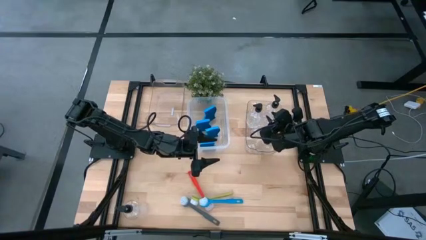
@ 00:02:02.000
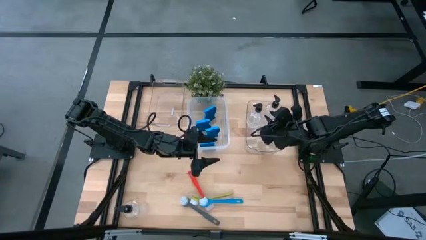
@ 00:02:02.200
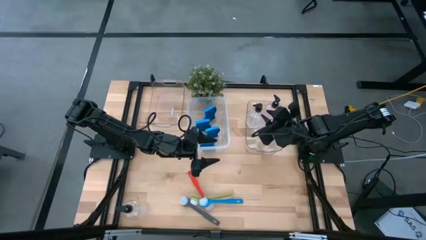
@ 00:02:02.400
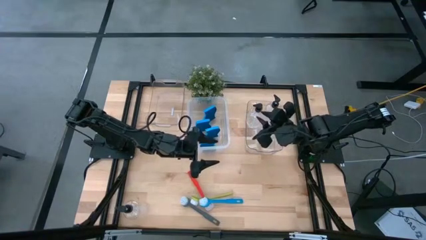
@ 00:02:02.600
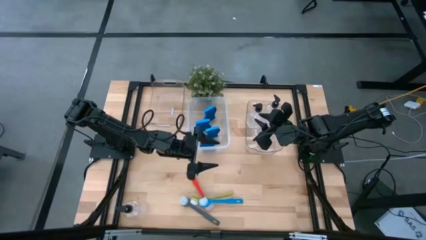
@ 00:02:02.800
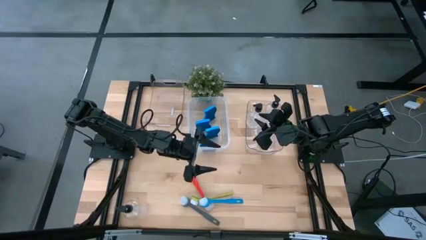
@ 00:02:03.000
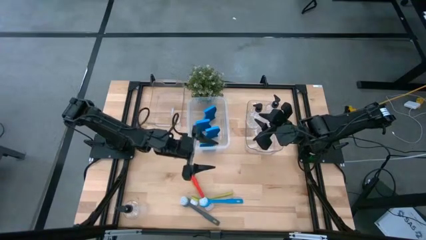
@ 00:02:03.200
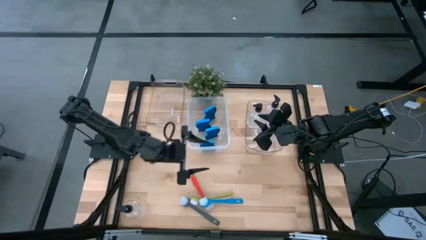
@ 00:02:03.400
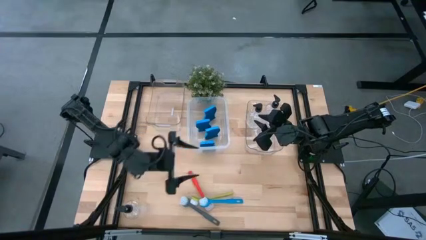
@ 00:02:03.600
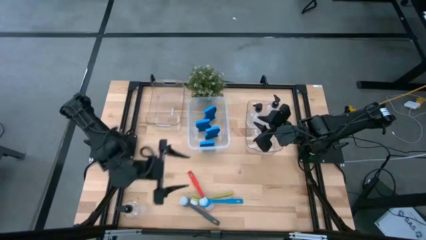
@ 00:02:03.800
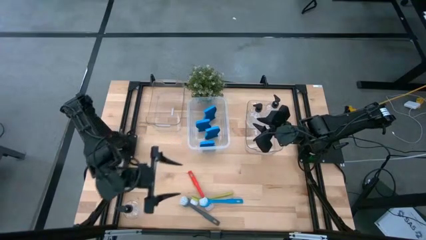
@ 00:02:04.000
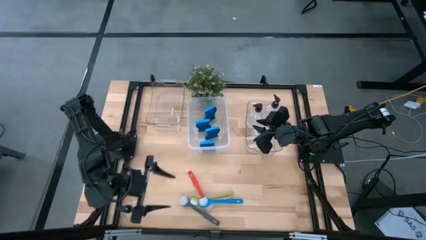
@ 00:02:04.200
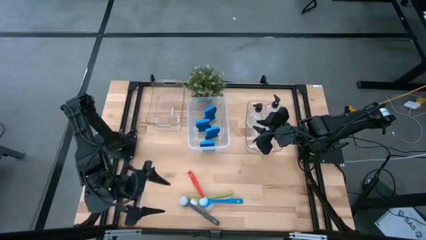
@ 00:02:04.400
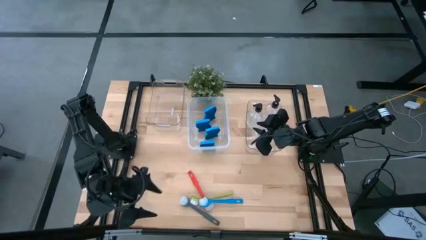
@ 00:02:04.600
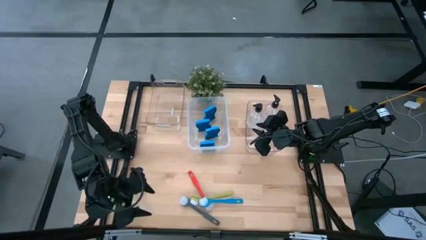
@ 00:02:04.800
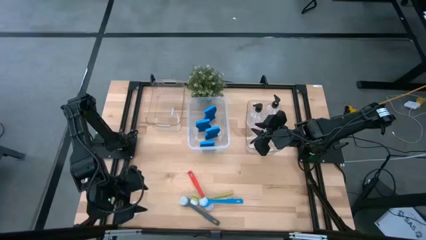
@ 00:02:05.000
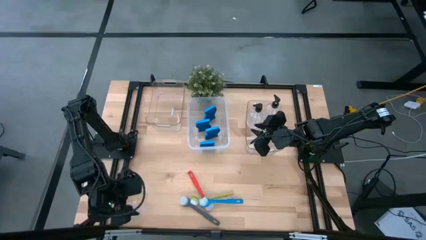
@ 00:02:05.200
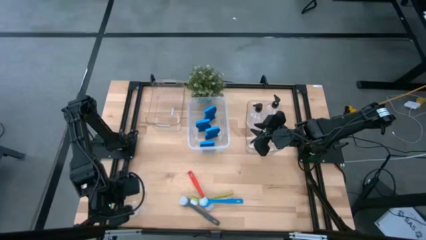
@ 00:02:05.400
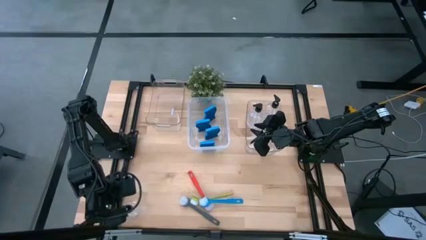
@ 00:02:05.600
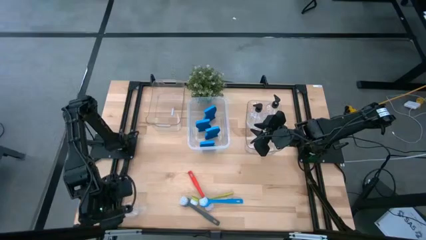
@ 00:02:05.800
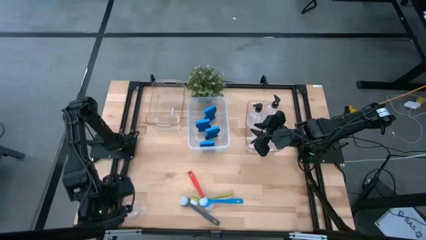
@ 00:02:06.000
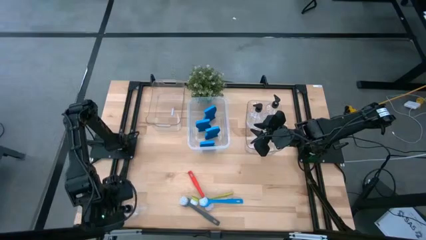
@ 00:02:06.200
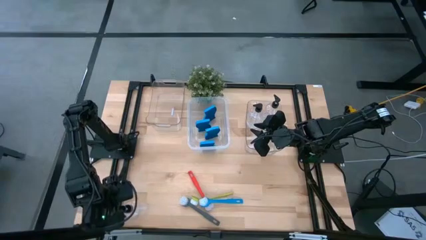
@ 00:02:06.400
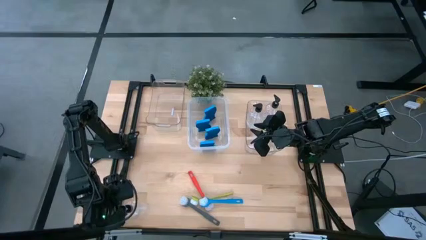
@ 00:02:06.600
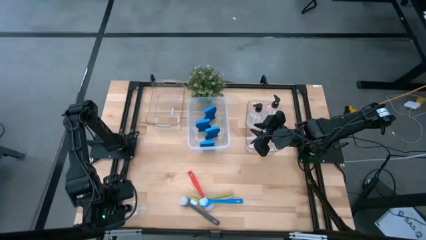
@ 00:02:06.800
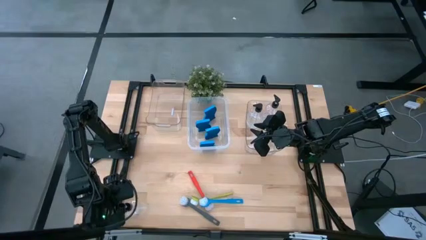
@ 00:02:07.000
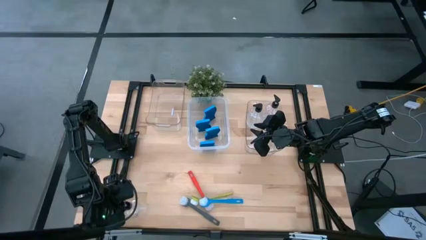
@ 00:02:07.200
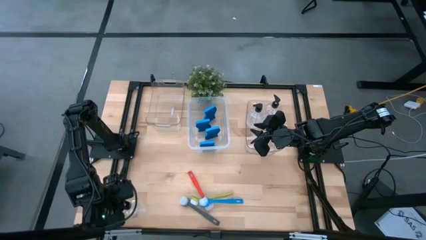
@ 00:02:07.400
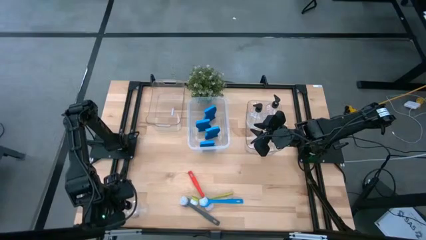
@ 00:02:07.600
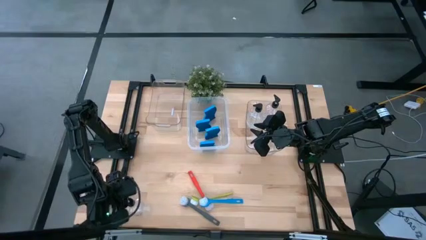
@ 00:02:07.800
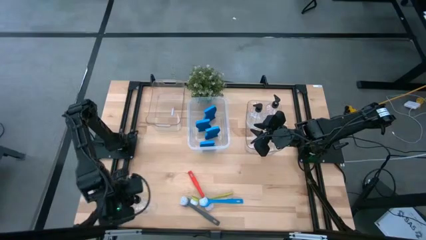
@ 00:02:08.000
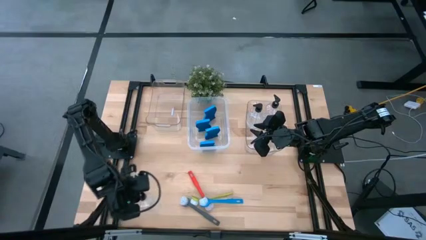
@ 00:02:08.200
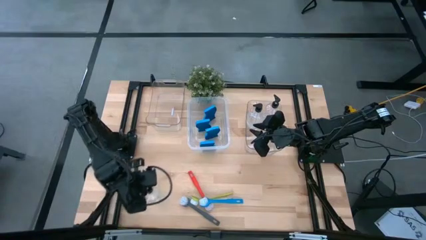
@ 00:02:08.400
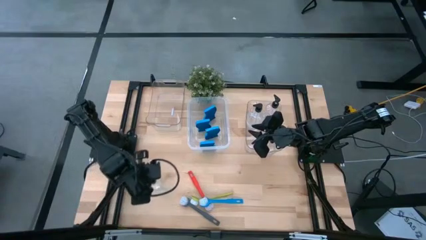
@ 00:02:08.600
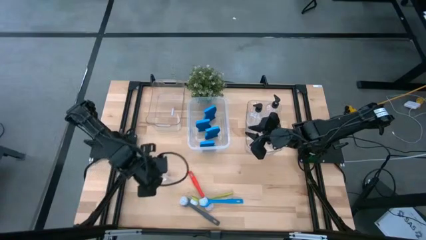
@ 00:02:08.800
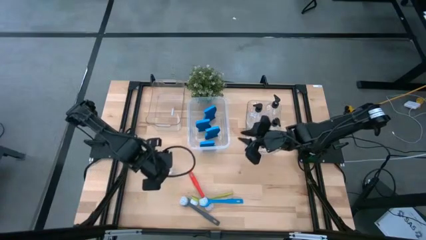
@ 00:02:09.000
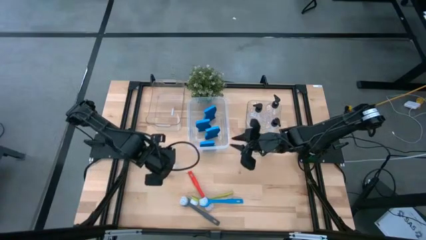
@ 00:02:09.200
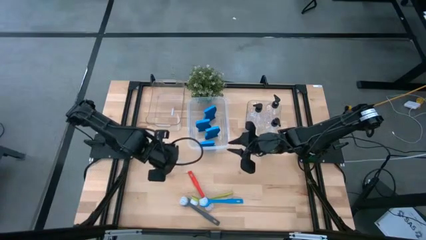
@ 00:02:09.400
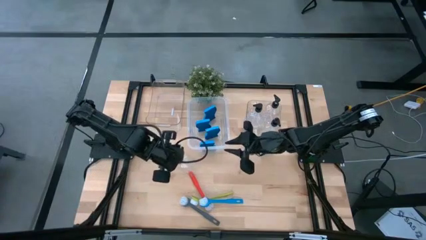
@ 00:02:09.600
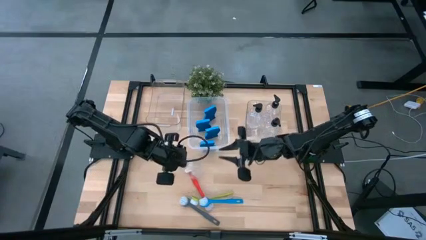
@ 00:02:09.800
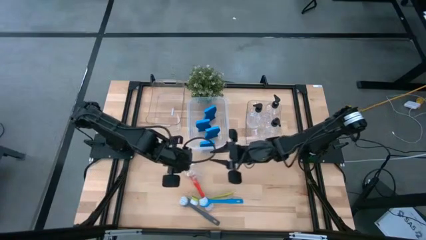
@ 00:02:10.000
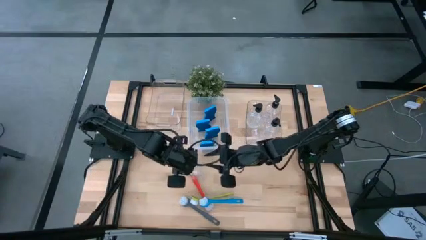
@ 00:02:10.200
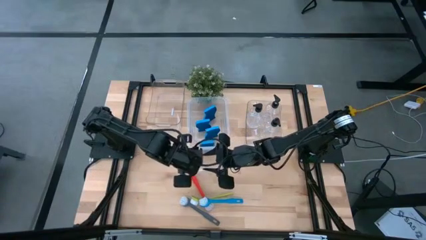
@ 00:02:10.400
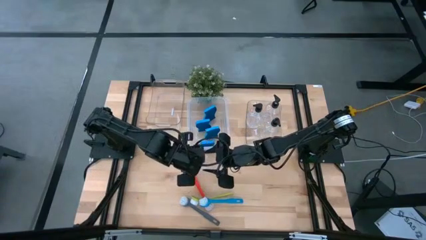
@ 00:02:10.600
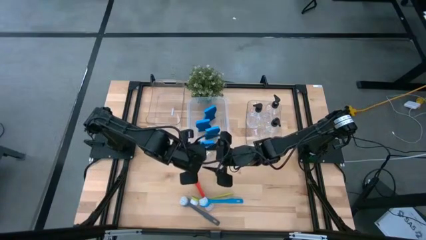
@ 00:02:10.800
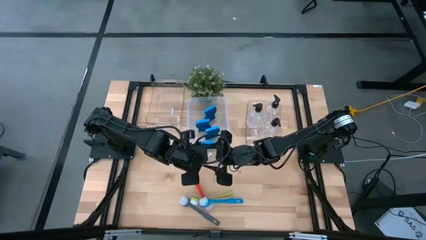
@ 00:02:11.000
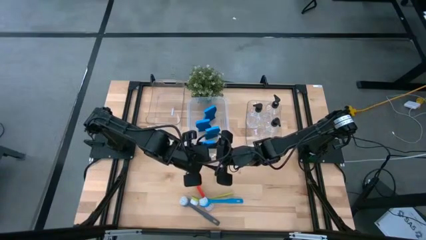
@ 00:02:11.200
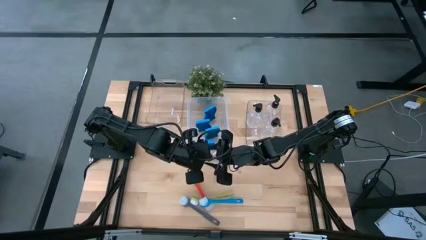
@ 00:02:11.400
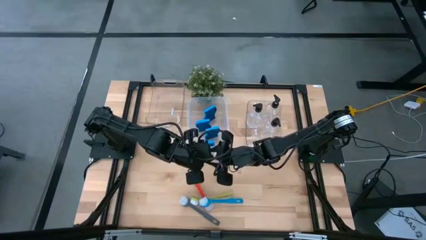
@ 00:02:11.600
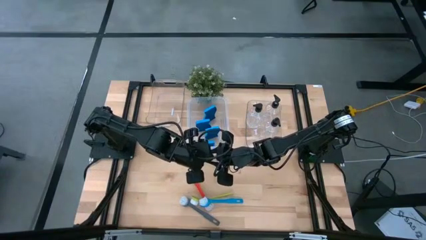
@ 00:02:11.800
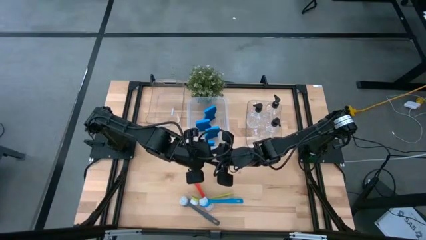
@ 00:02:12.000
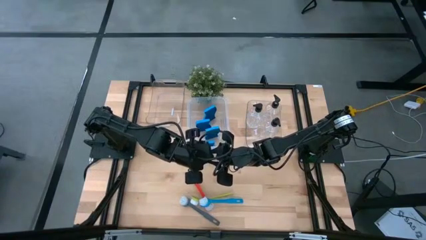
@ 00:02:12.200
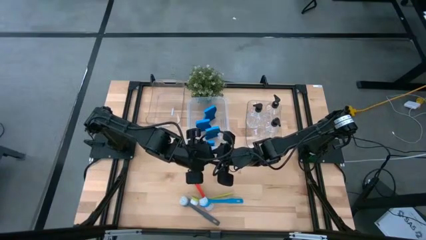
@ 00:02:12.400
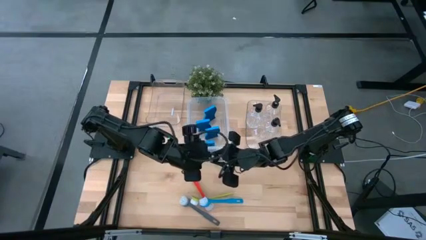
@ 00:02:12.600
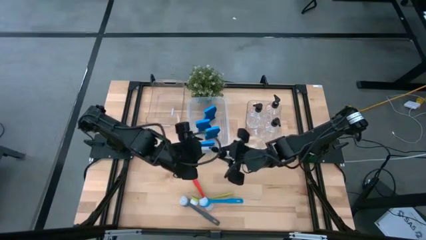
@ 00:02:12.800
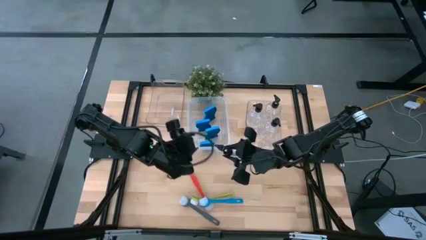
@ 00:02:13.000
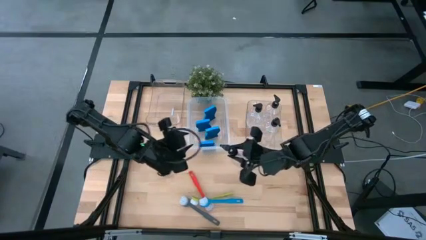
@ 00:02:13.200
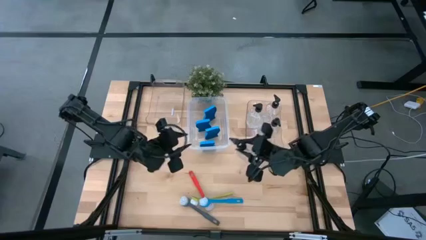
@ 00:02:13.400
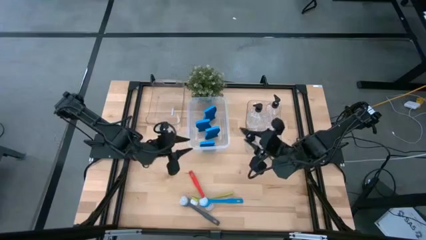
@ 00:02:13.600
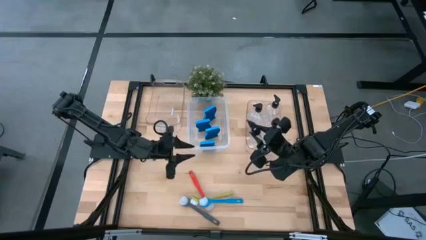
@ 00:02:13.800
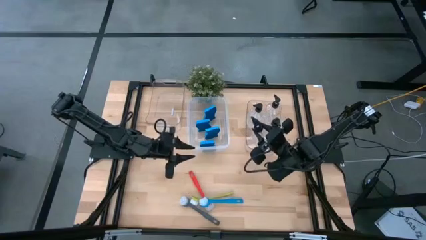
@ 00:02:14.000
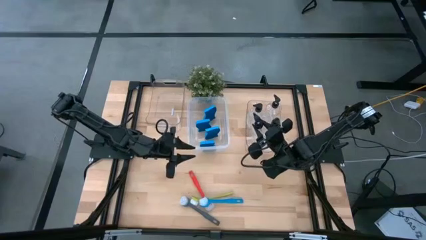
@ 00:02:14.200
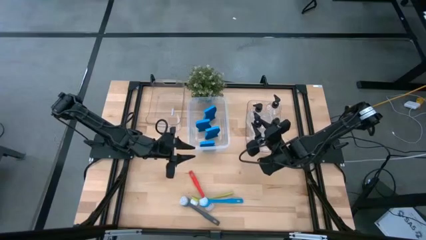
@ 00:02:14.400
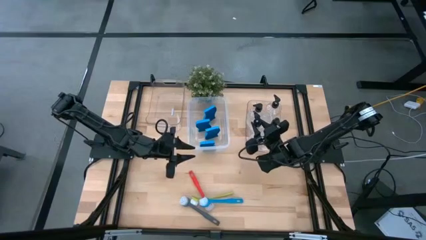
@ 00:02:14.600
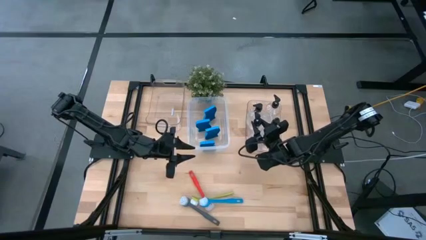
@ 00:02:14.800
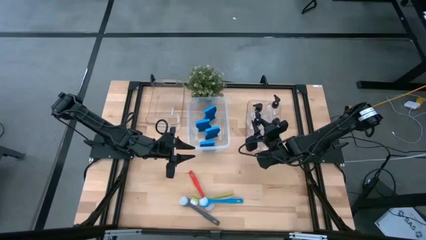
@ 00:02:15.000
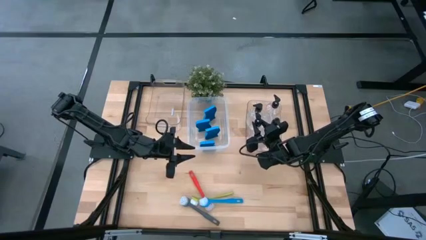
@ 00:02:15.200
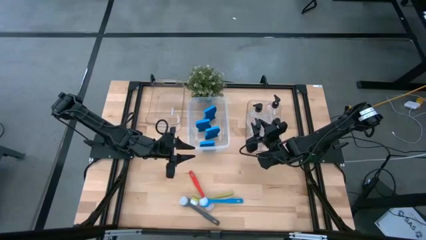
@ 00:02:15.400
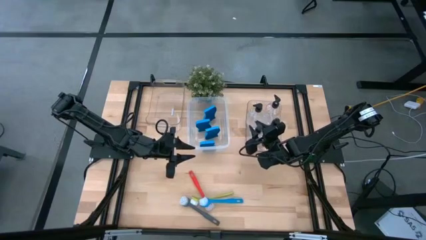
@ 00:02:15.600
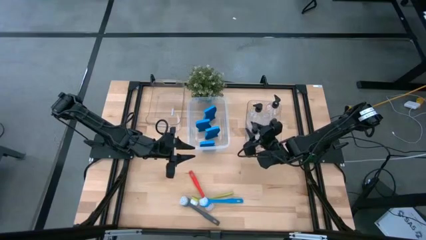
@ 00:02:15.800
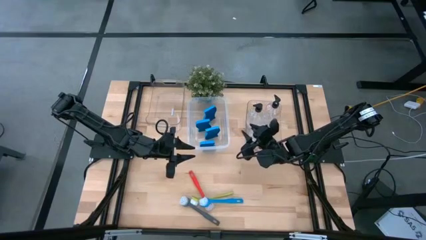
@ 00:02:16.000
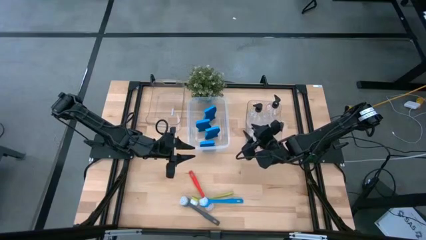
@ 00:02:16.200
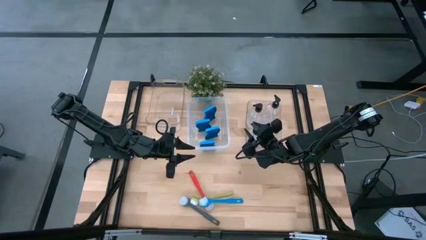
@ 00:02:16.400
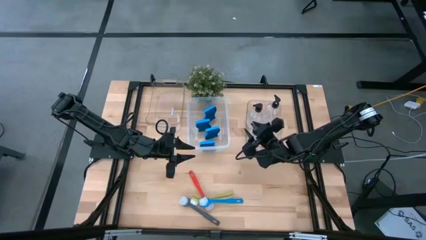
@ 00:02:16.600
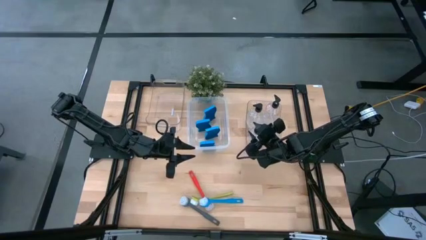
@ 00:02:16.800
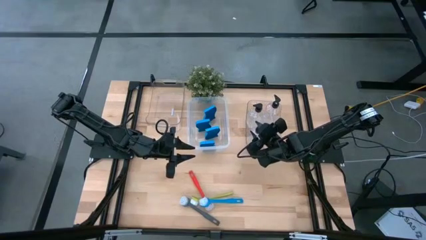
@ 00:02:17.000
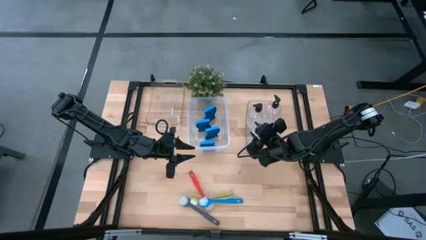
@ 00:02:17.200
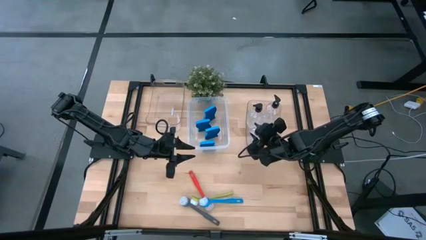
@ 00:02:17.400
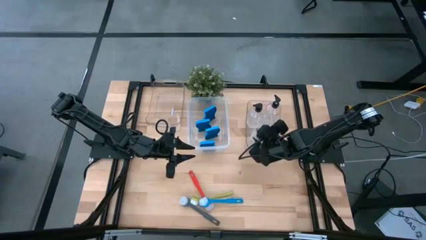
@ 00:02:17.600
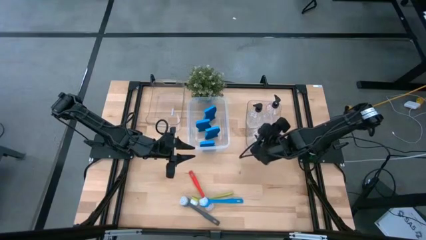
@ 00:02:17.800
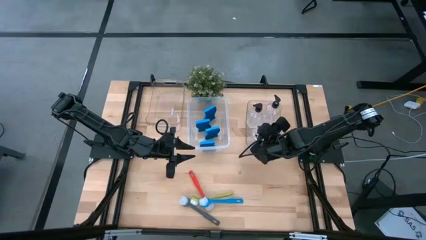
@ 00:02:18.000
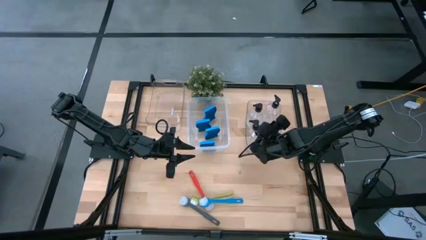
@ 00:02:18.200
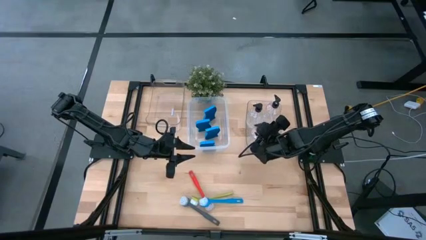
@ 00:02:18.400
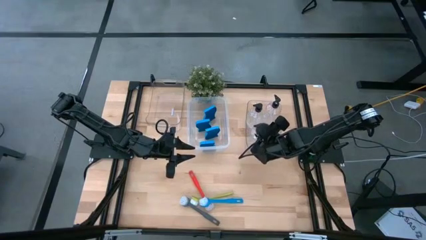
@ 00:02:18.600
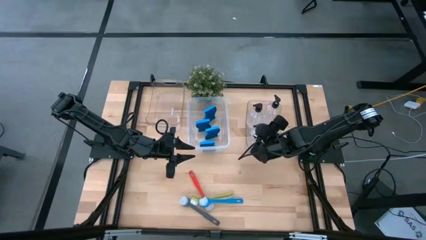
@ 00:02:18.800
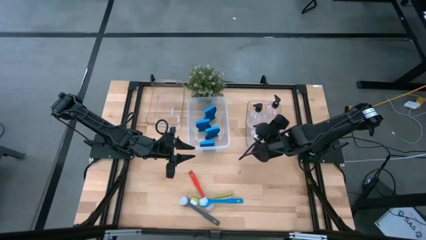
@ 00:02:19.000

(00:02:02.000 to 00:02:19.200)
Task: Pick & Place Kitchen Sink Supplies
Put the transparent bottle into the right transparent bin
